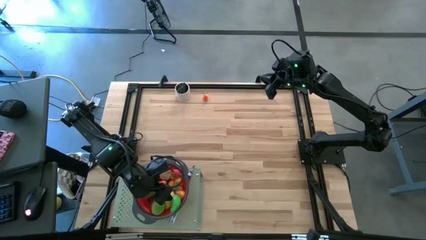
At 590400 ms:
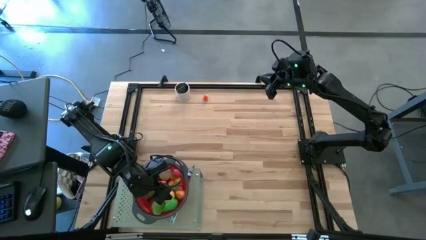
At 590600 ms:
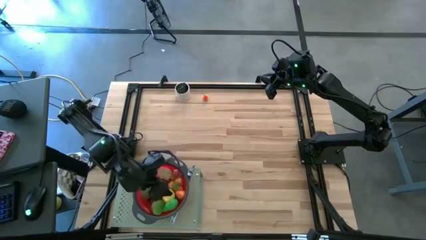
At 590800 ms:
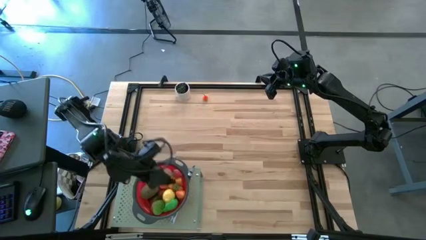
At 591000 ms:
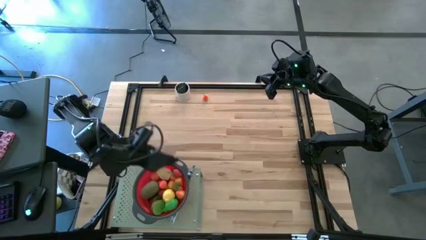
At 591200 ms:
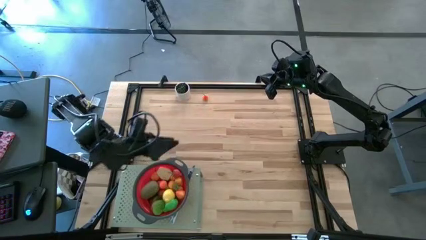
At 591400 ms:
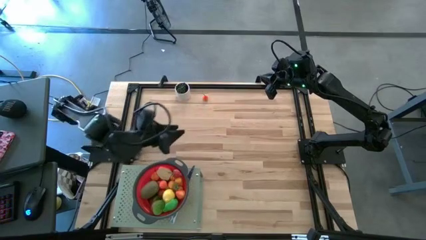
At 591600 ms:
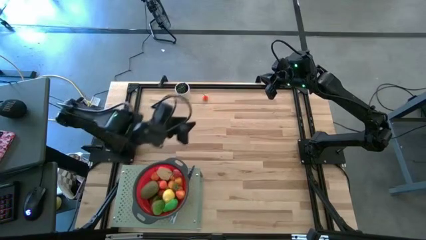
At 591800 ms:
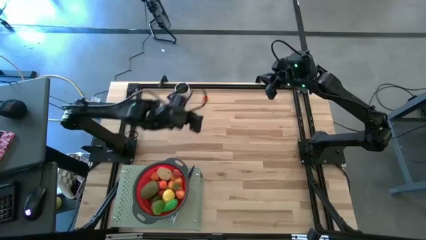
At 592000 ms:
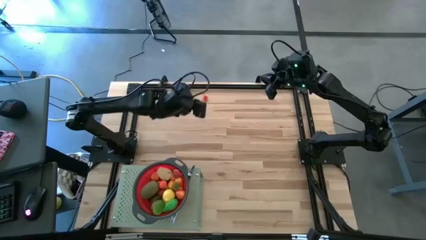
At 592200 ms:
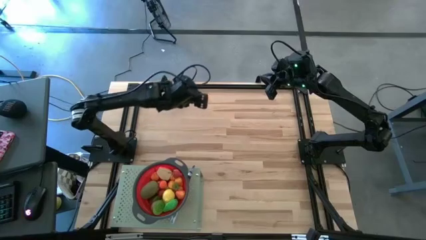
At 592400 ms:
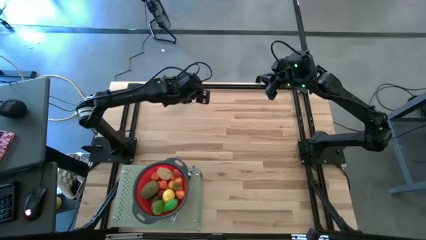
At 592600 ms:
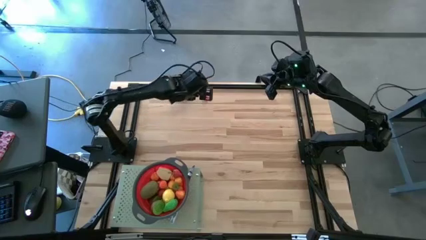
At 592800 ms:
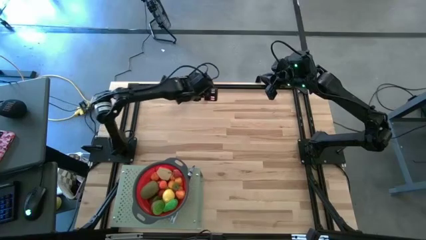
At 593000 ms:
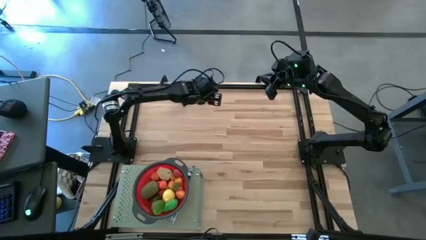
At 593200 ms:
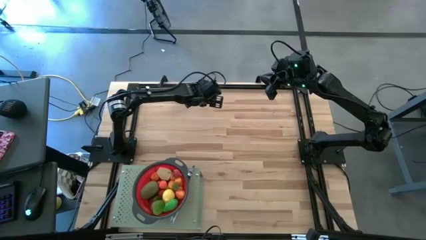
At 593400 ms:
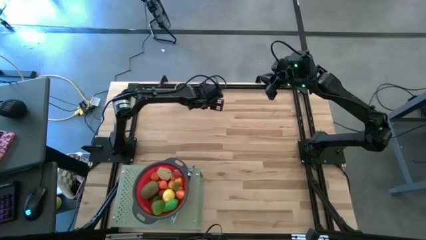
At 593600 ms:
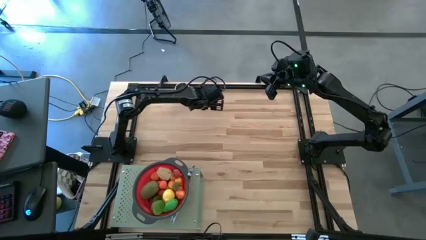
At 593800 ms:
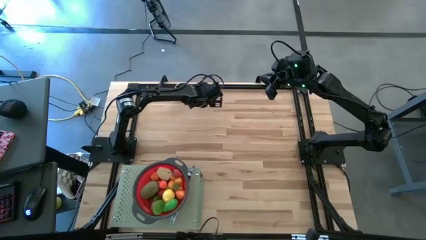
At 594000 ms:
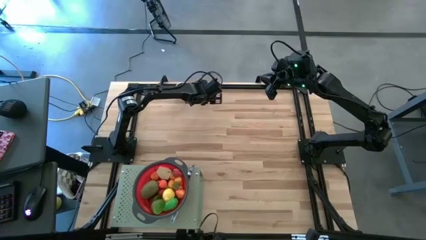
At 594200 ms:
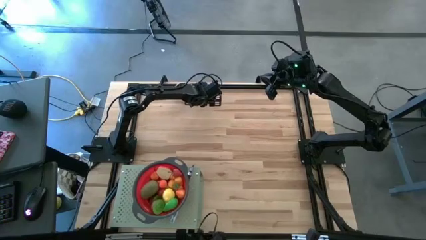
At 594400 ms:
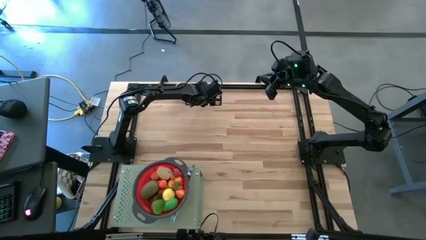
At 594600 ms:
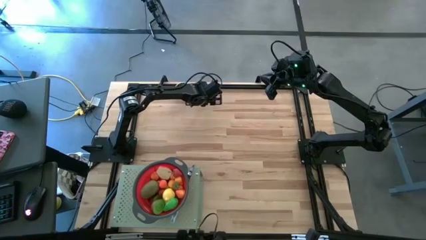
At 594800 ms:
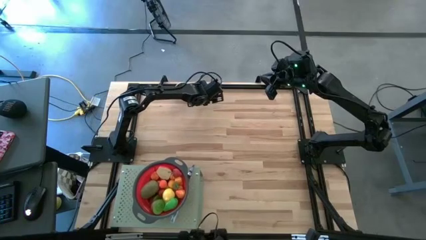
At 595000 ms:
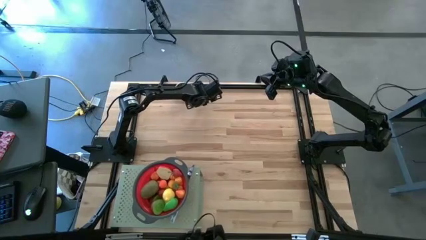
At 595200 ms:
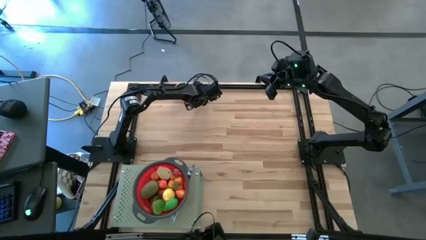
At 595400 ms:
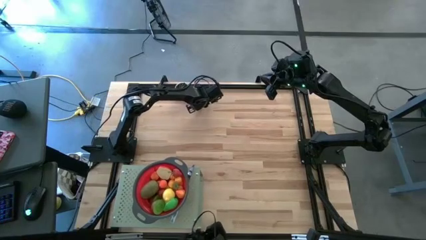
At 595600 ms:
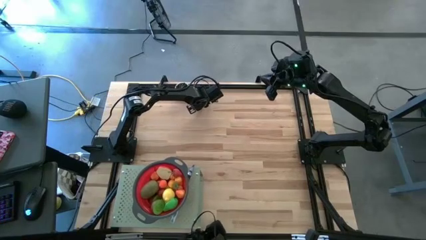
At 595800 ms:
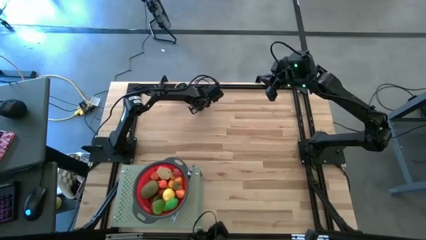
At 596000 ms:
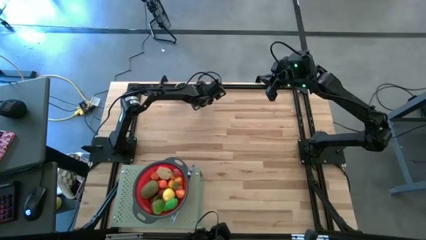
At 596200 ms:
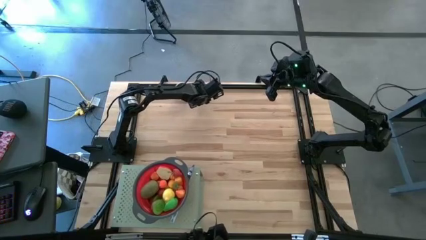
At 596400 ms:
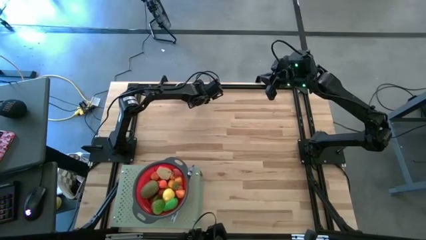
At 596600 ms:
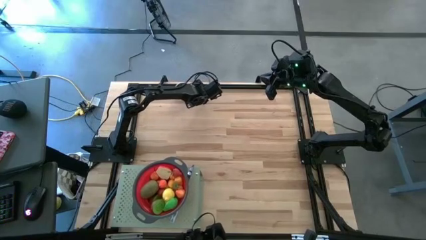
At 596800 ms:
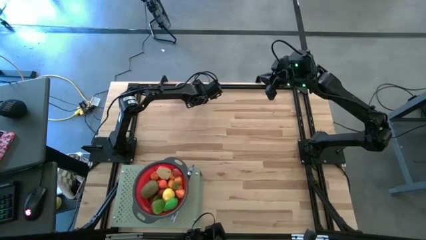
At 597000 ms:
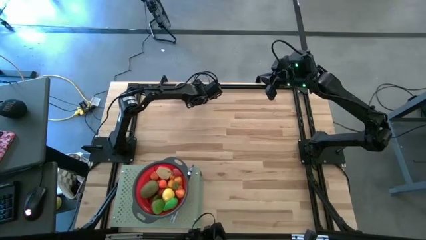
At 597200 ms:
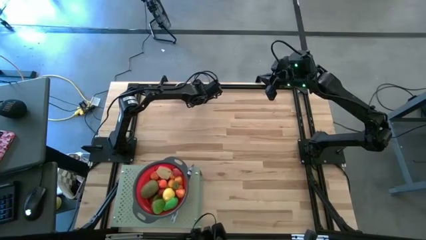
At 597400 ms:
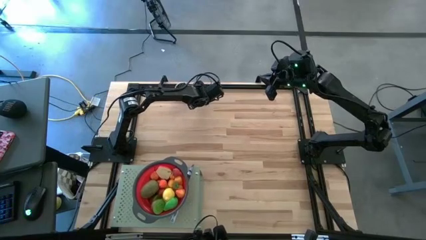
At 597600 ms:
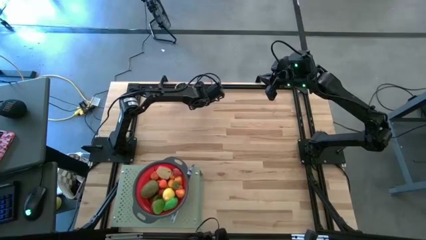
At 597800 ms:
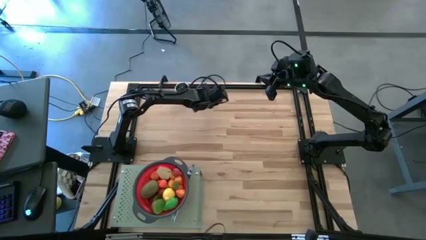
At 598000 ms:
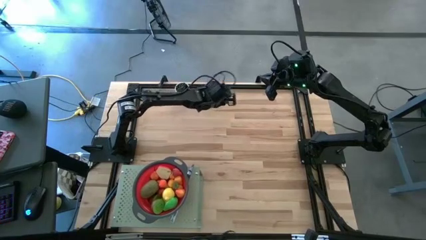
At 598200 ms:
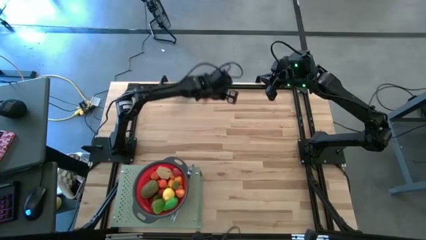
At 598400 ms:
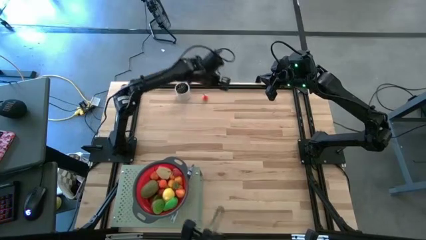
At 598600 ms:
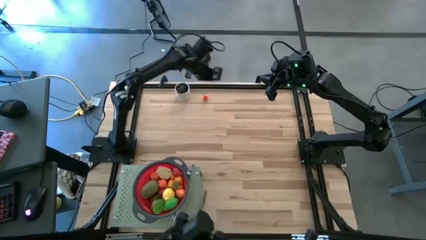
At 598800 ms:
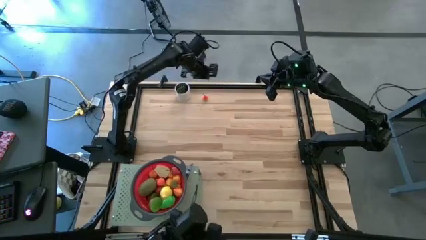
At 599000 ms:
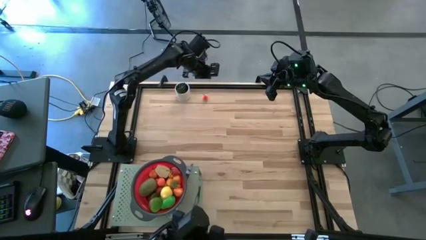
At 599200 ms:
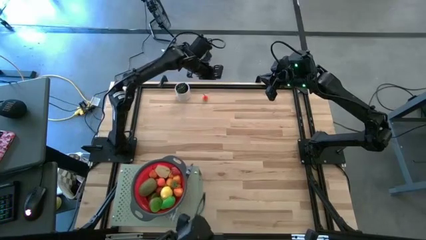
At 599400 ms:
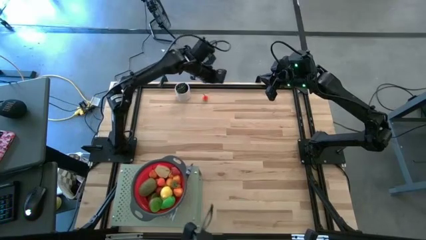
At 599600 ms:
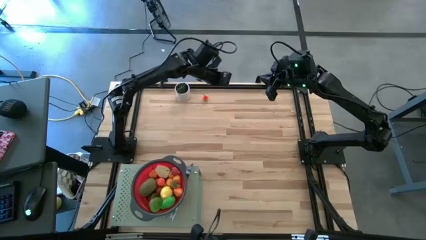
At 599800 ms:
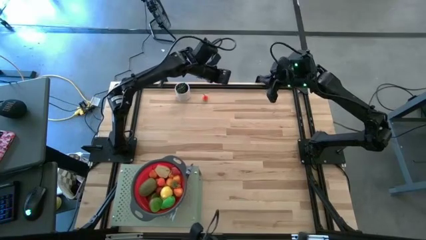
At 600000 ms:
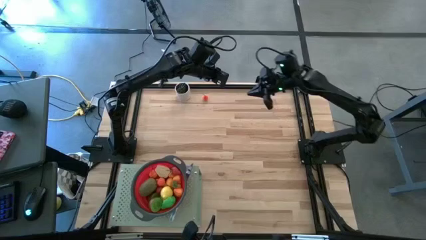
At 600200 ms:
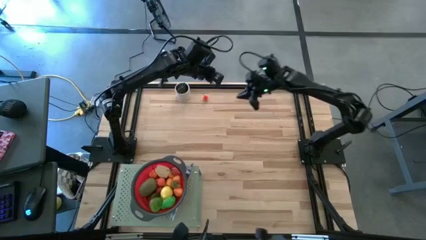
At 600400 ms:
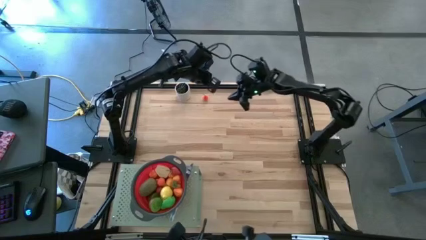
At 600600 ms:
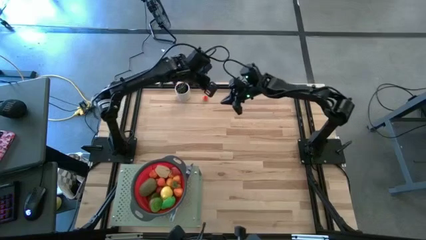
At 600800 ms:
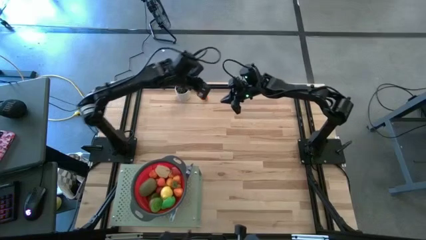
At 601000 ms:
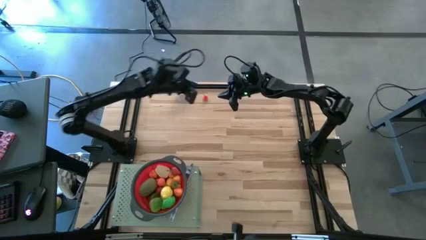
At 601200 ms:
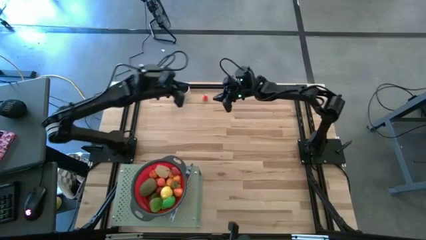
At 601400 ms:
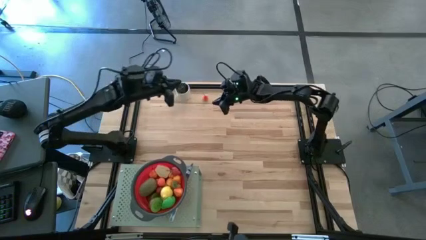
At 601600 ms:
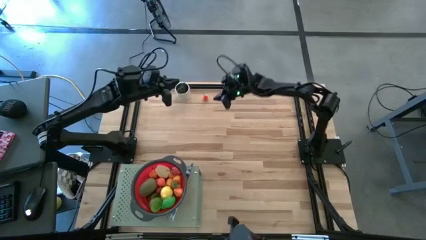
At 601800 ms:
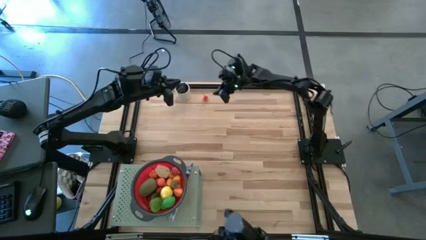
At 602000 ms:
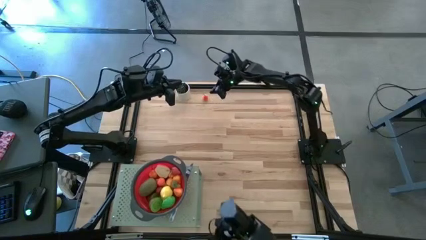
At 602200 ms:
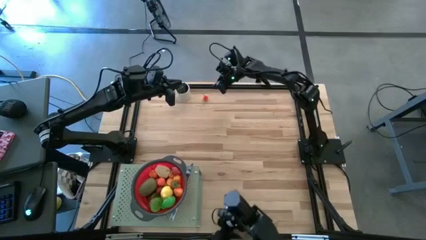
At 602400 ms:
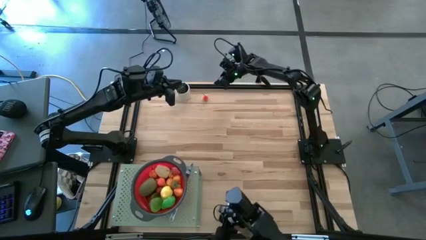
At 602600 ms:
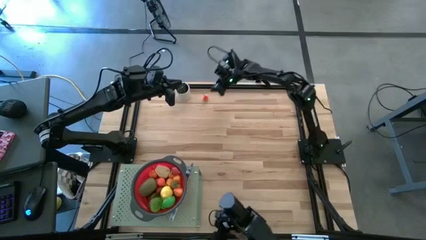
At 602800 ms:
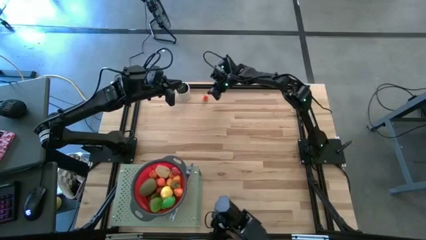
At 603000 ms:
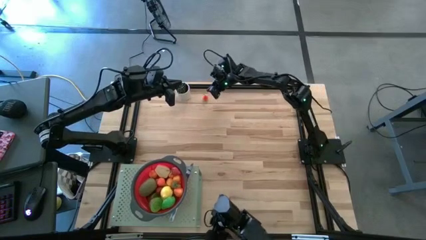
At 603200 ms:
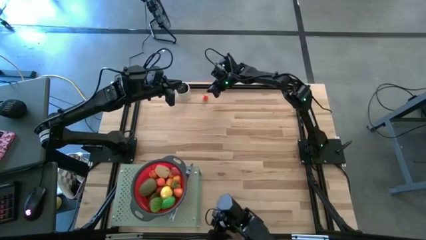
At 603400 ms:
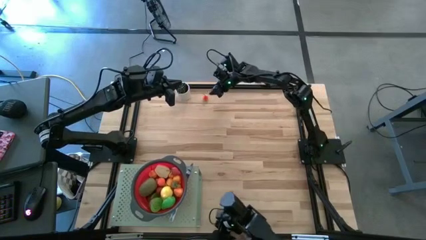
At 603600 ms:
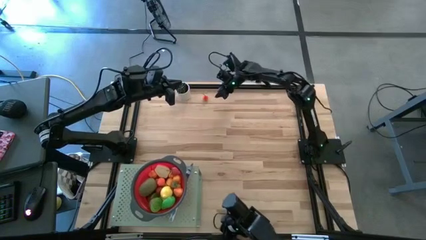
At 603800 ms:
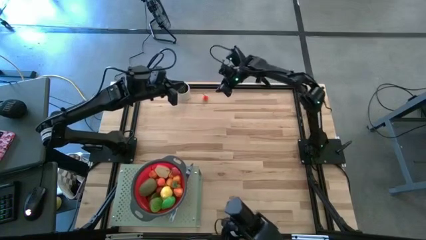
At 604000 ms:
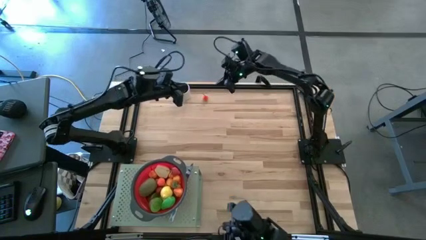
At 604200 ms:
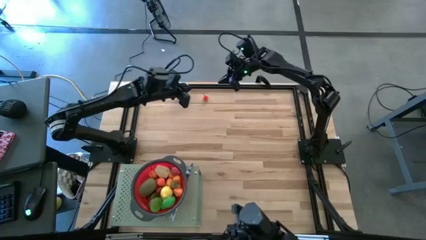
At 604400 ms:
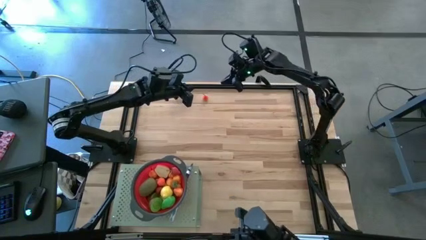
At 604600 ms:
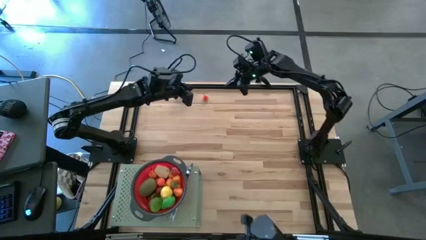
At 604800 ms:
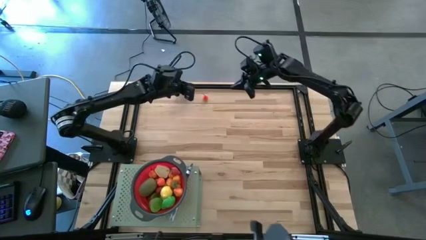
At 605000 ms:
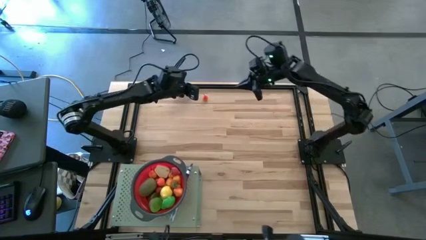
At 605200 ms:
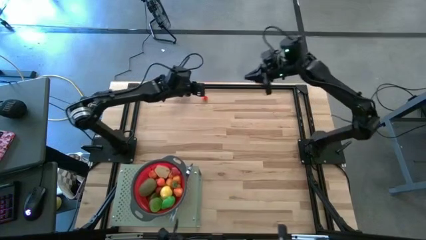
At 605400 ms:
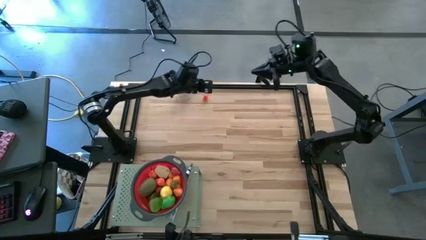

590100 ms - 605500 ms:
Task: Pick & Place Fruit
Put the pear into the red strainer bowl on the shelf
